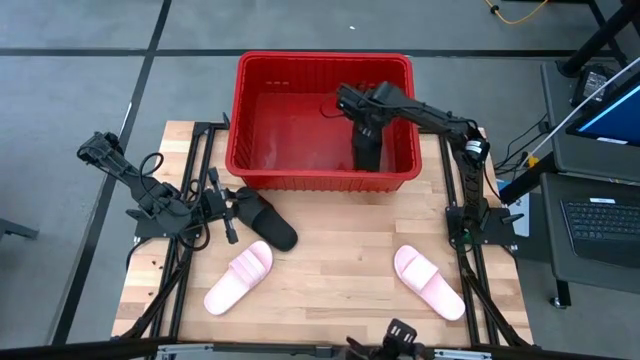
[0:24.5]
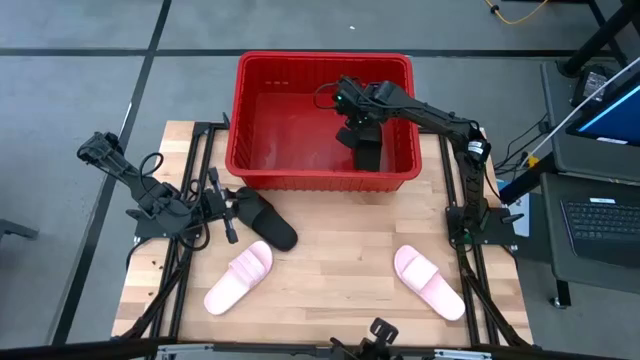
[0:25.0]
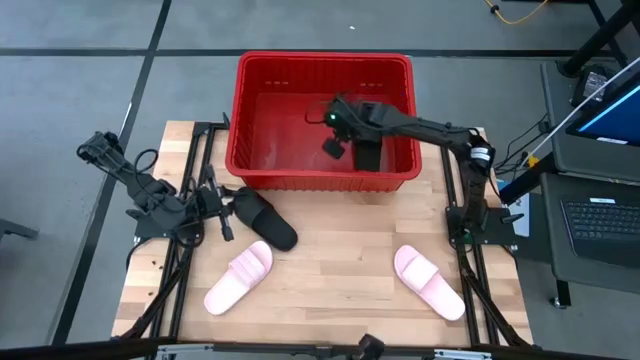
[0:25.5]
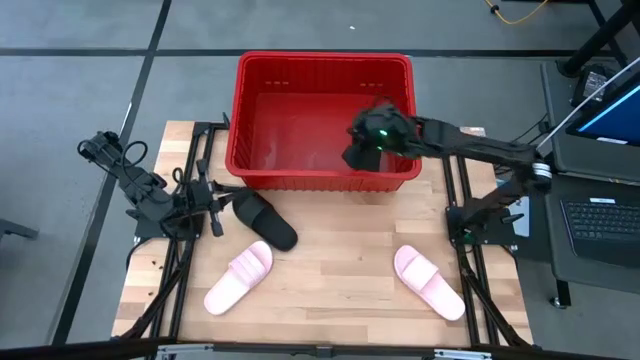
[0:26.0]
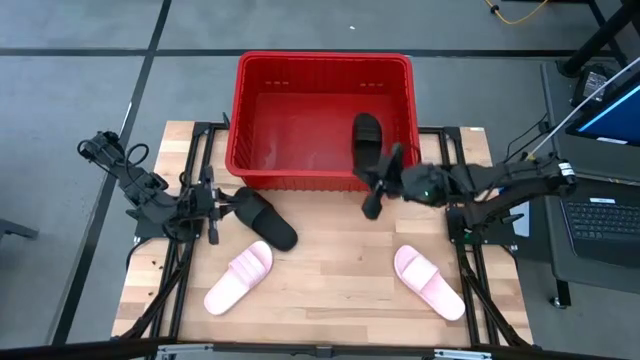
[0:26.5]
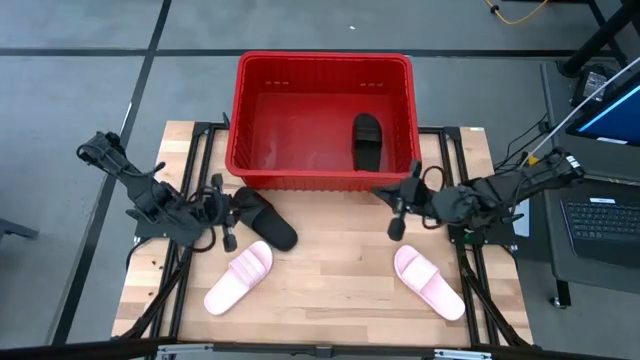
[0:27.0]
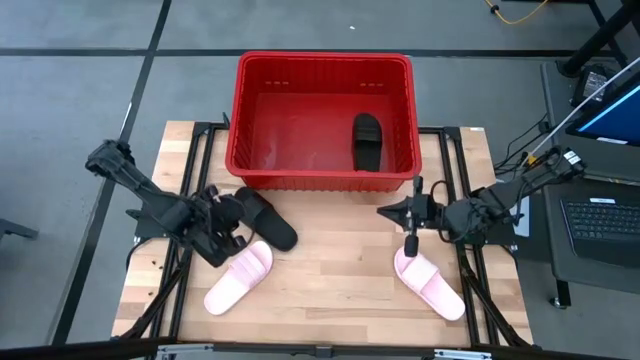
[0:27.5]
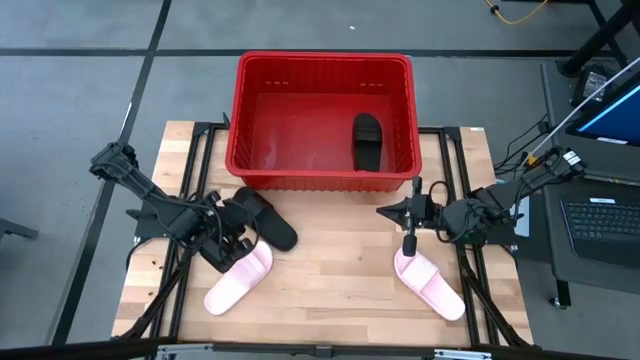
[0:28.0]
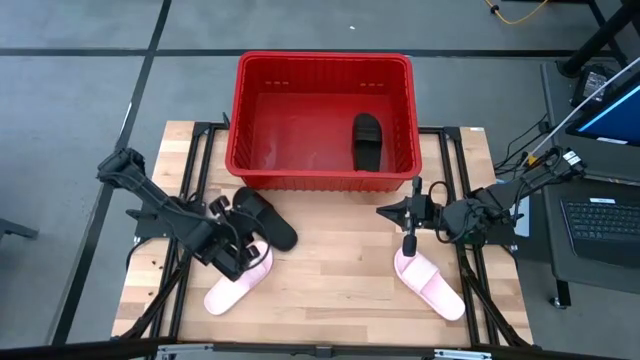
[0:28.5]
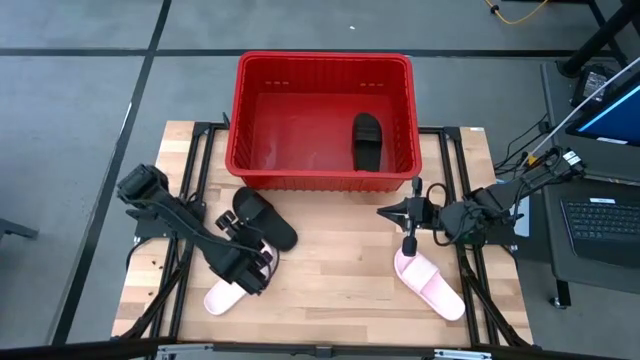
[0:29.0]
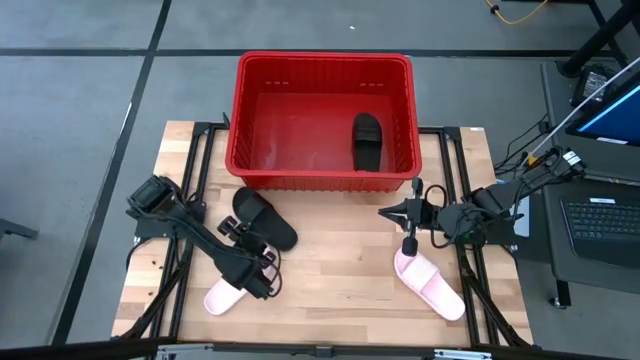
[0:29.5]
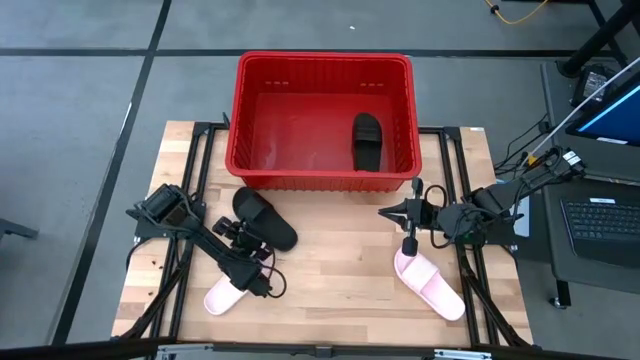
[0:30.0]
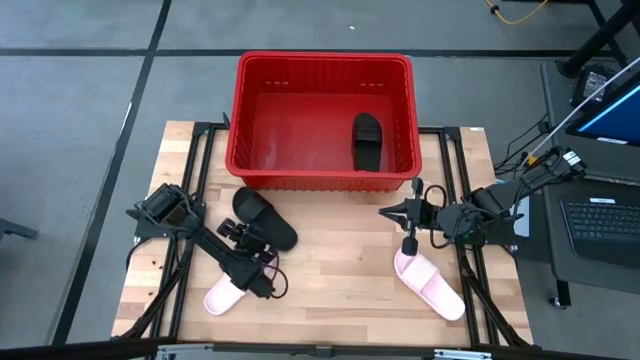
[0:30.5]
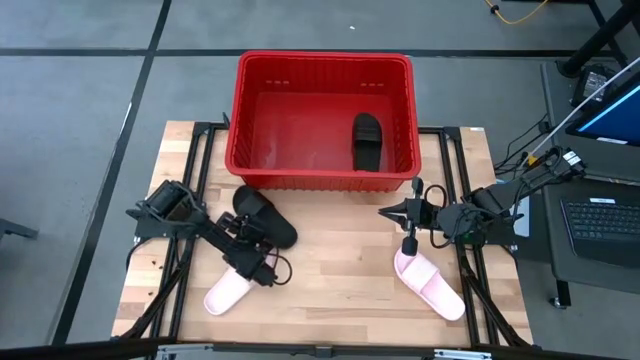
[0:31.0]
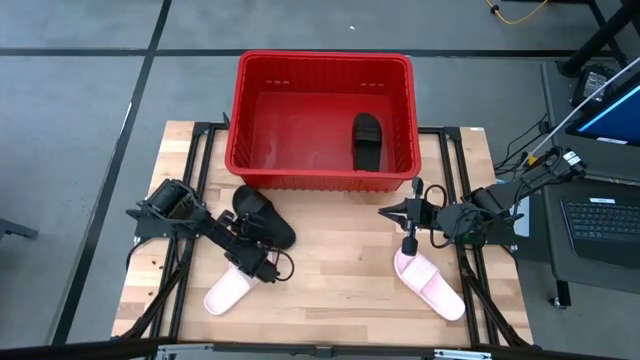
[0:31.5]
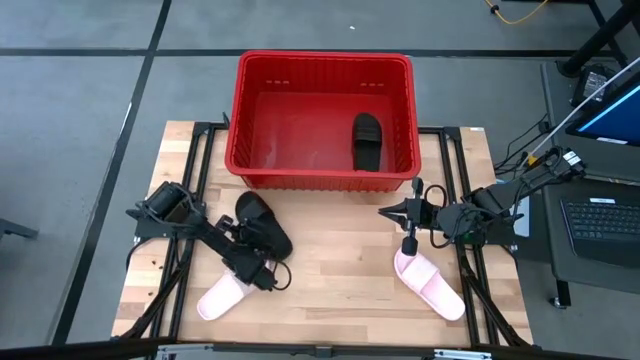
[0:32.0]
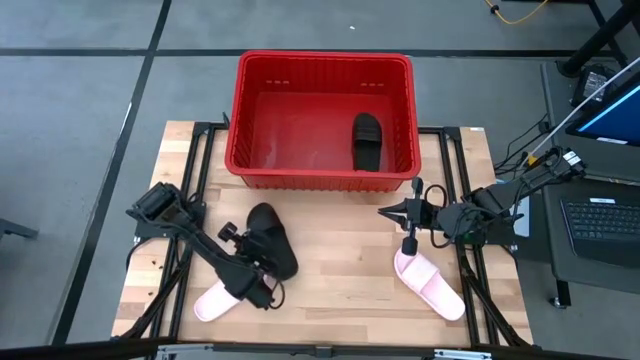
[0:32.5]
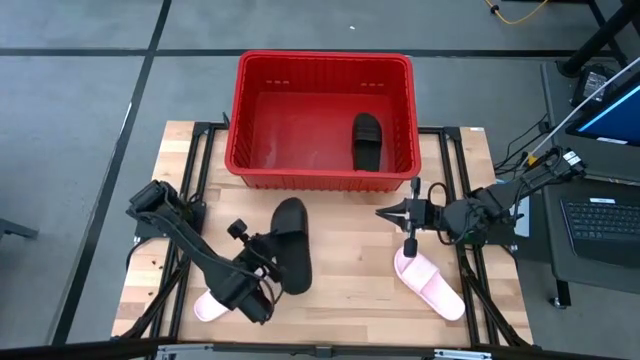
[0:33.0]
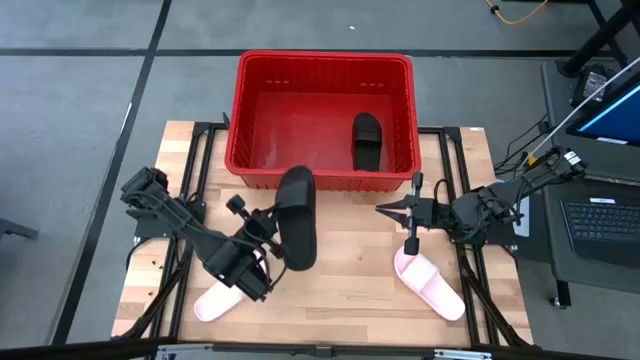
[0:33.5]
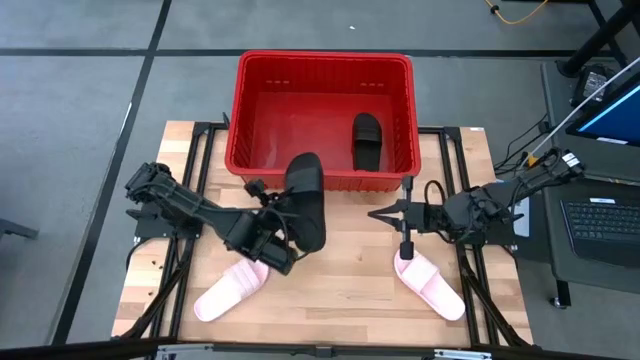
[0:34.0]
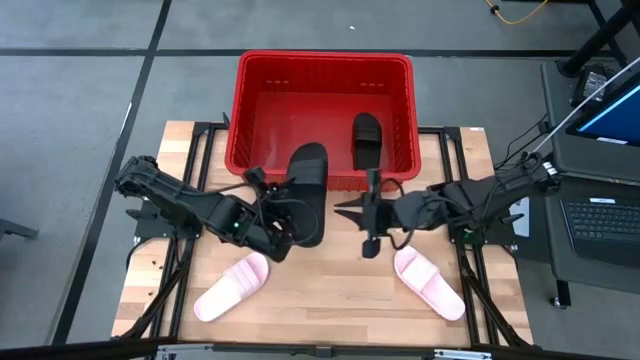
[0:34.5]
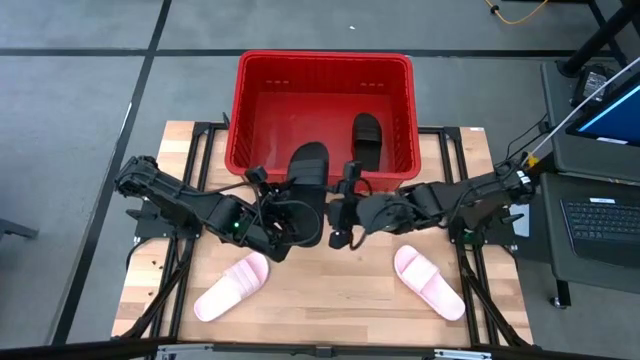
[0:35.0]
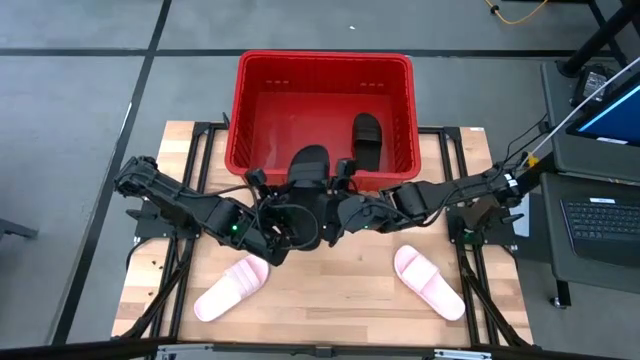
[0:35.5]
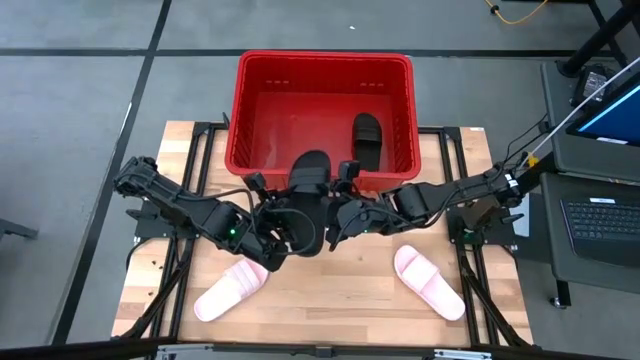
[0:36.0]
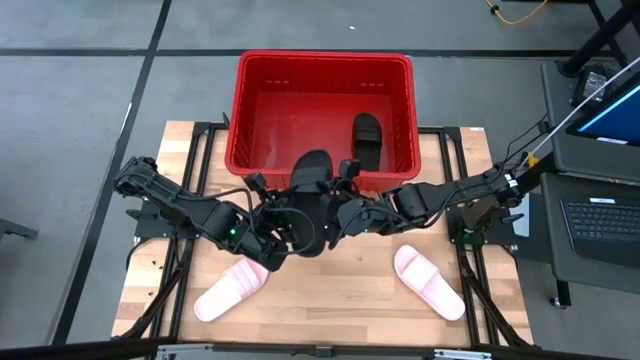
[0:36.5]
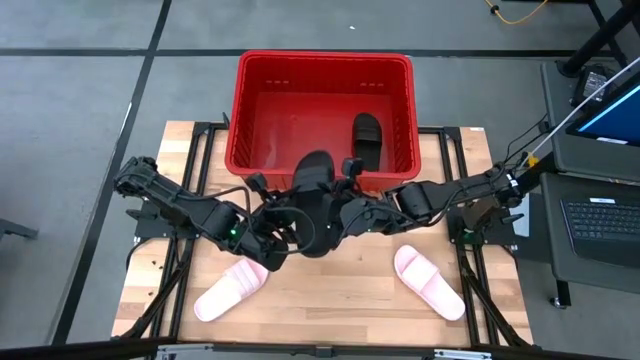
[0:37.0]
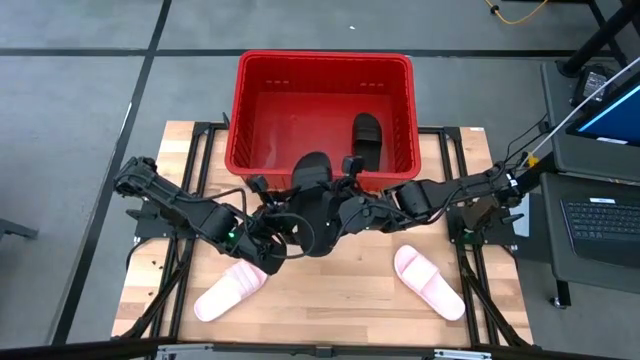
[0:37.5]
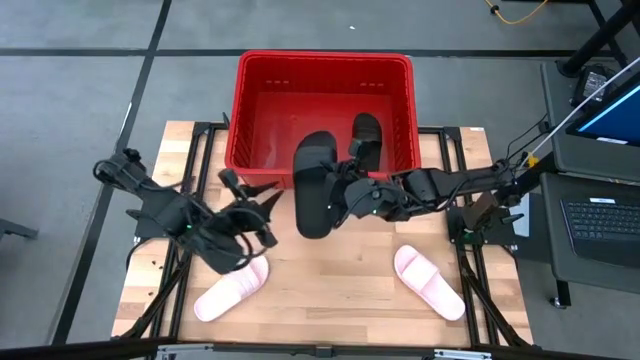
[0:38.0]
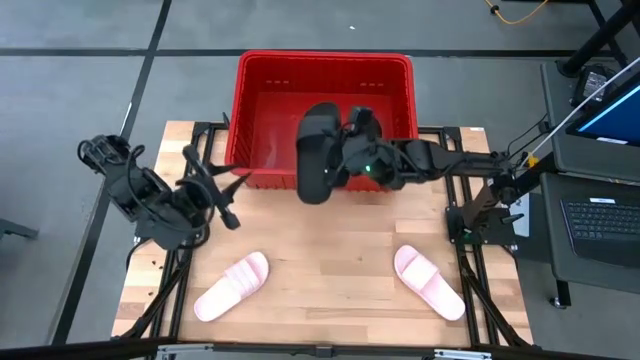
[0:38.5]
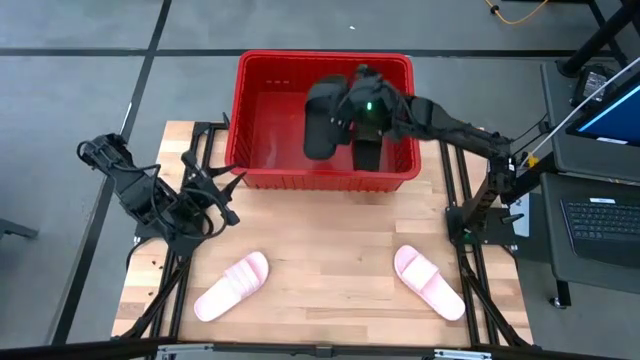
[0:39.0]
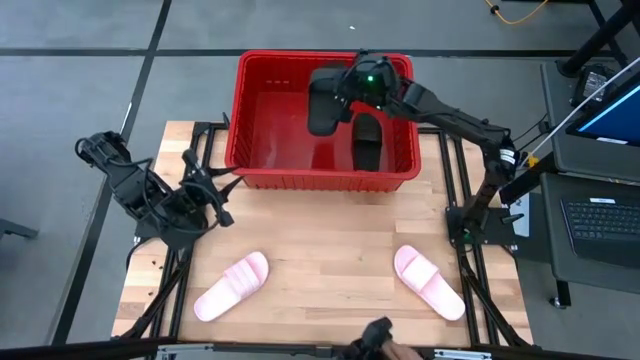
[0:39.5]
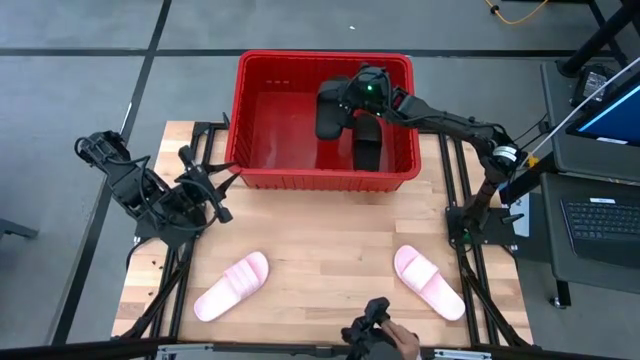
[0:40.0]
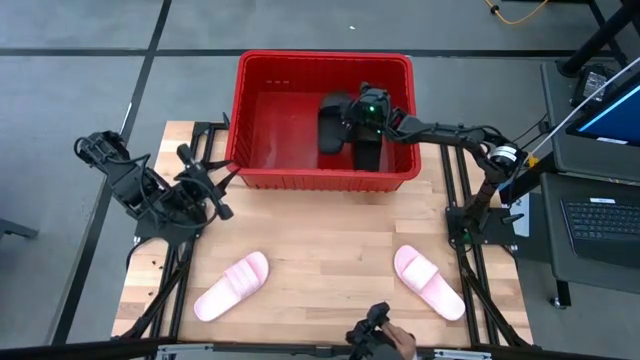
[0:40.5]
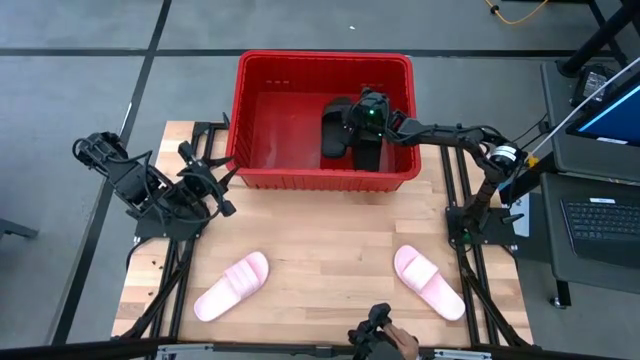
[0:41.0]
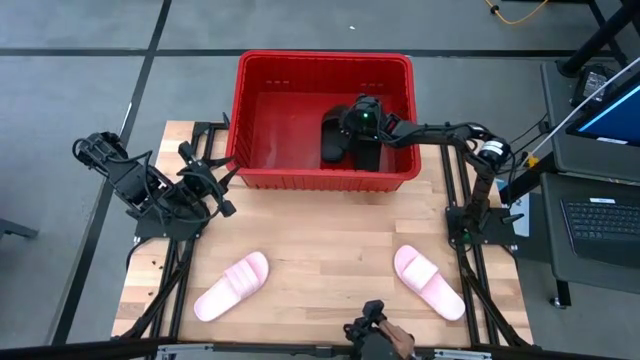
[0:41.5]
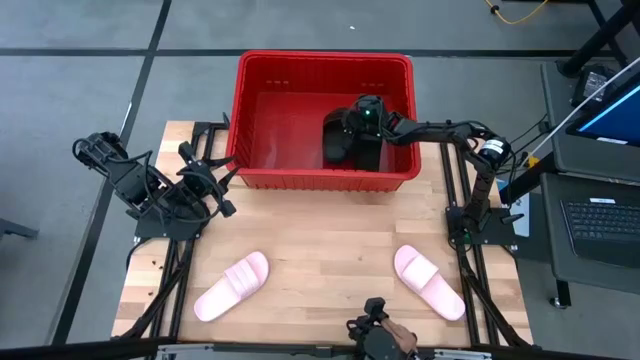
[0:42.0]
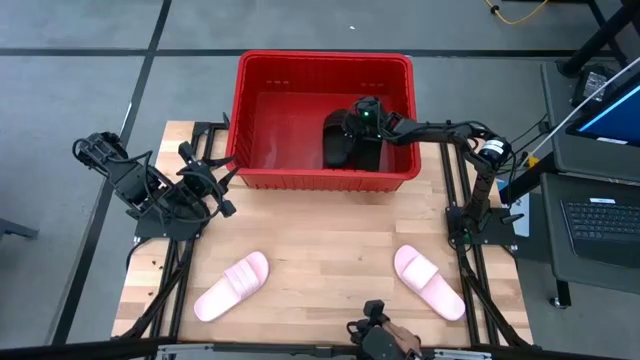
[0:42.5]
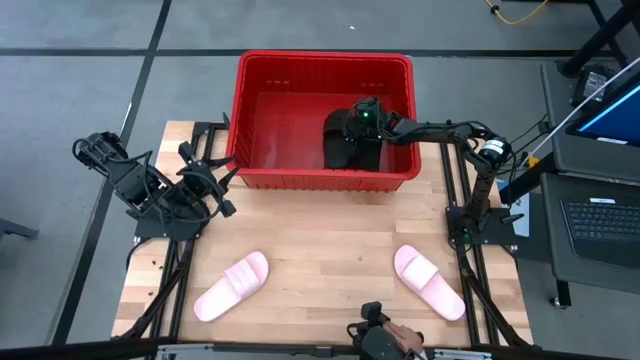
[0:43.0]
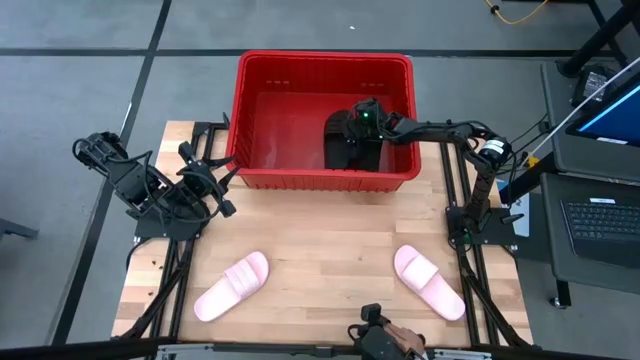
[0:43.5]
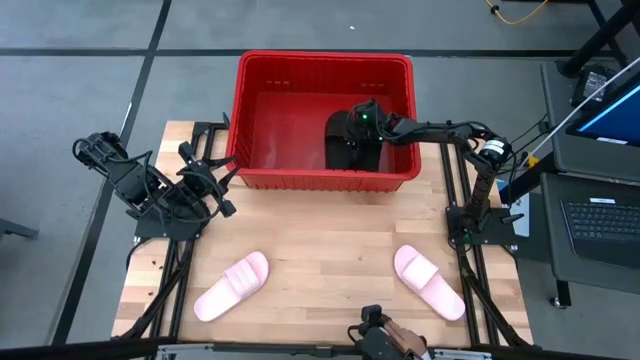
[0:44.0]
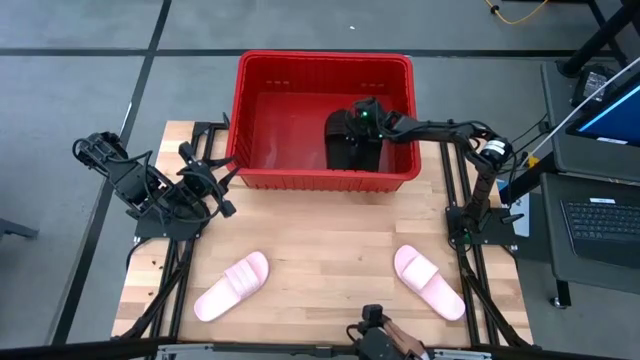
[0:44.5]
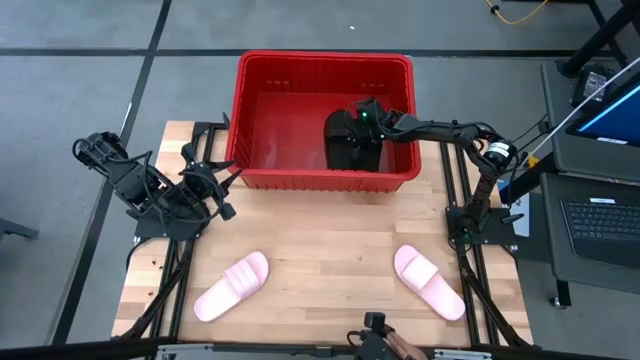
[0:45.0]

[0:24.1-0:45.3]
Task: Pick and place slides into bin
Put the black slide into the red bin

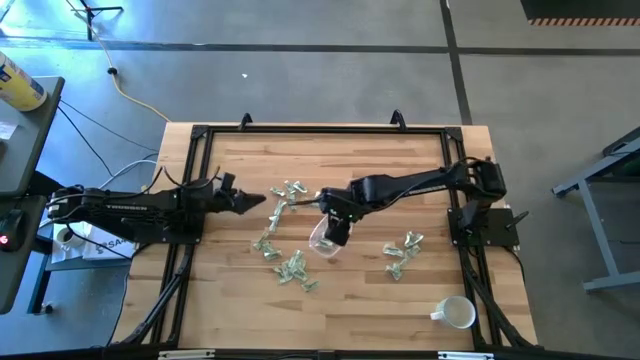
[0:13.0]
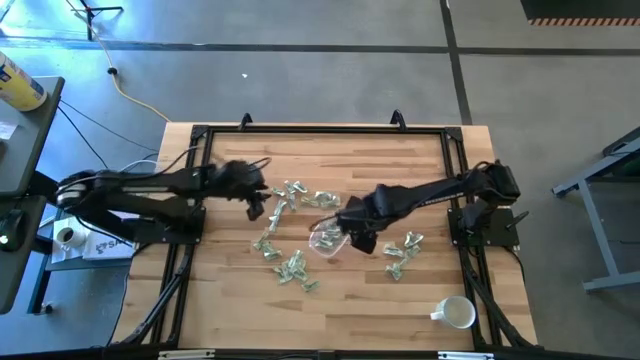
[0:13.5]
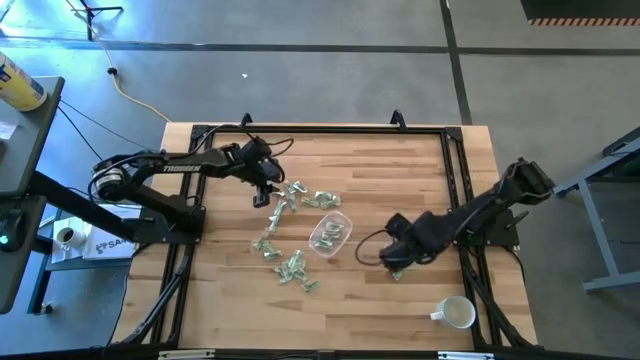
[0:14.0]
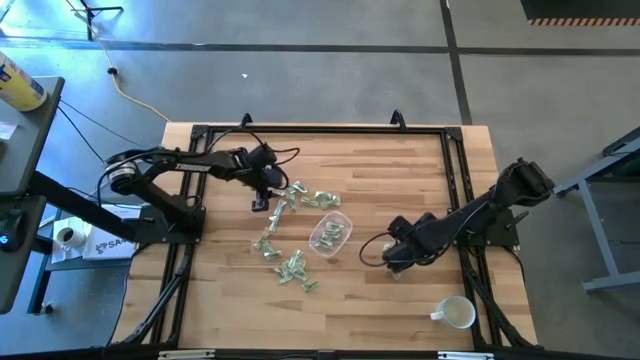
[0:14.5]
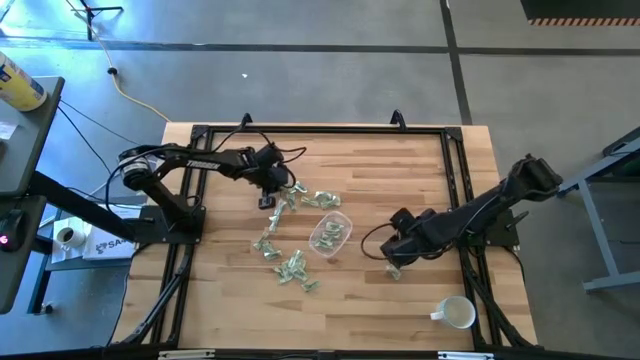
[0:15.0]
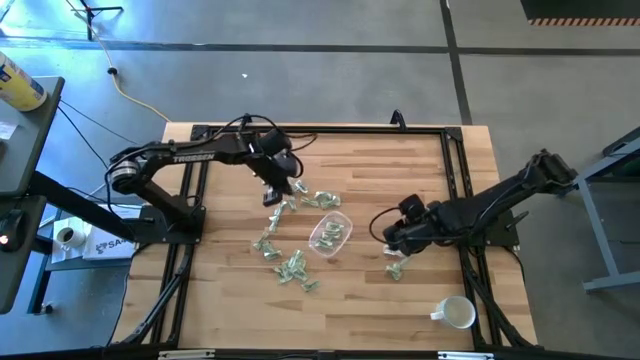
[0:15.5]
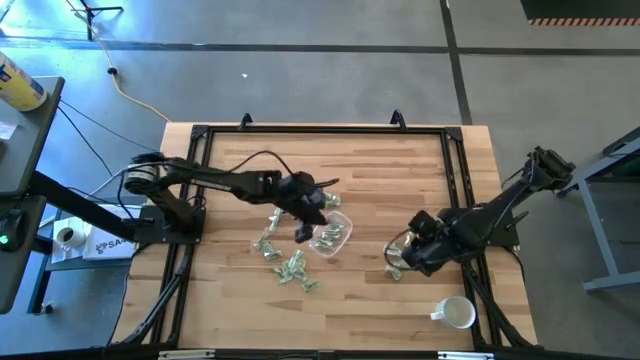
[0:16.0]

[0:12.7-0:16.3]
Task: Pick and place Stevia / Truvia into bins
Put the stevia packet into the transparent bin
